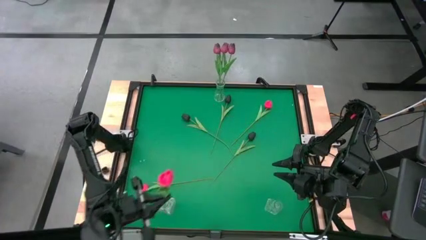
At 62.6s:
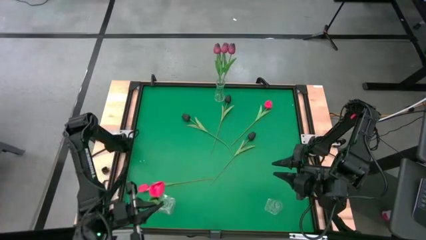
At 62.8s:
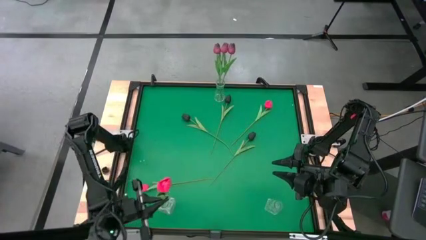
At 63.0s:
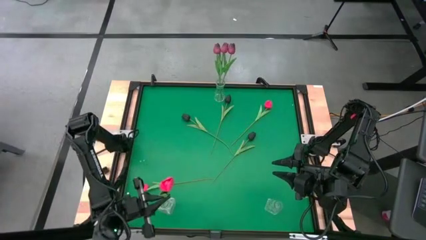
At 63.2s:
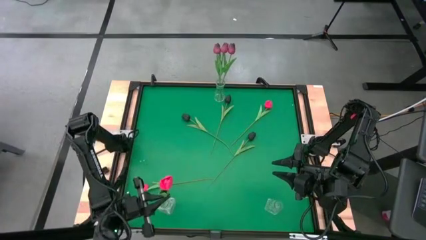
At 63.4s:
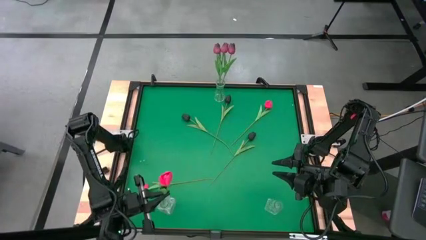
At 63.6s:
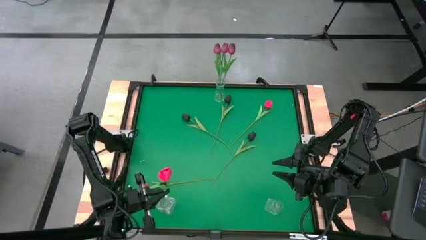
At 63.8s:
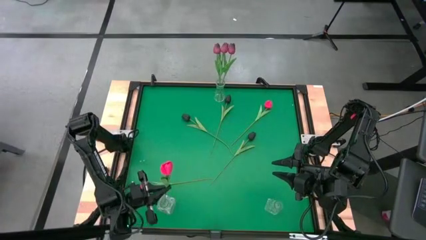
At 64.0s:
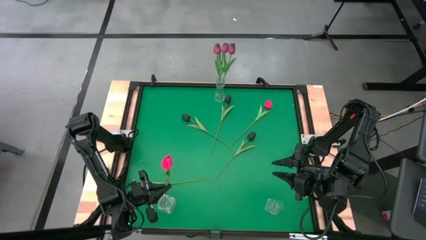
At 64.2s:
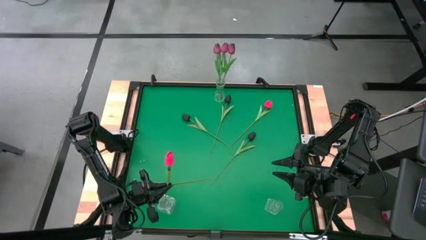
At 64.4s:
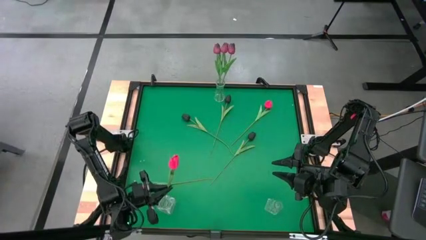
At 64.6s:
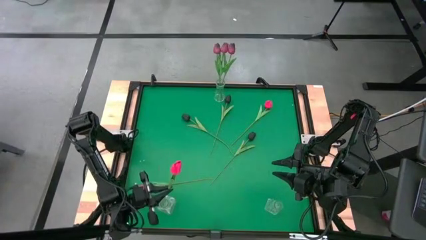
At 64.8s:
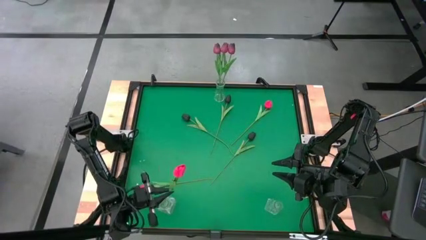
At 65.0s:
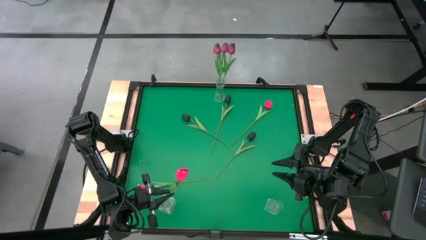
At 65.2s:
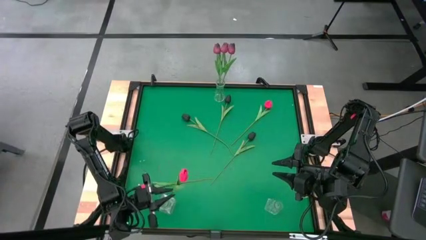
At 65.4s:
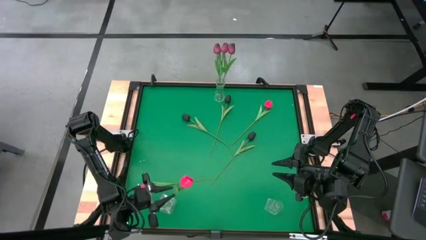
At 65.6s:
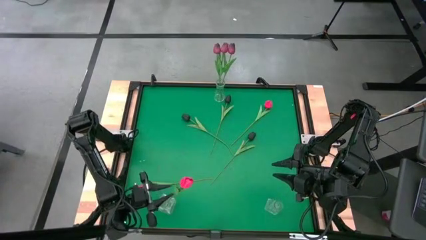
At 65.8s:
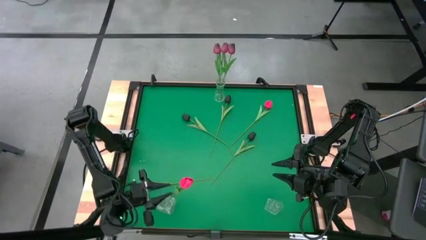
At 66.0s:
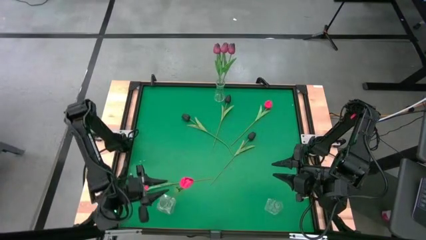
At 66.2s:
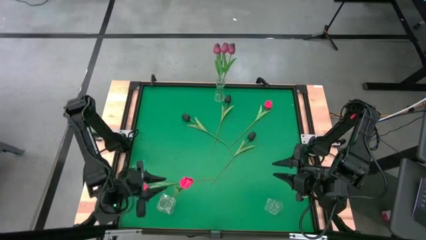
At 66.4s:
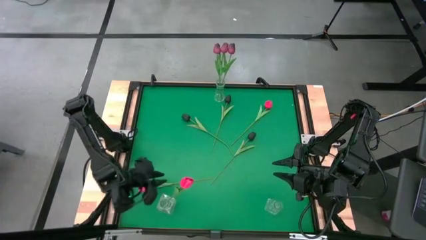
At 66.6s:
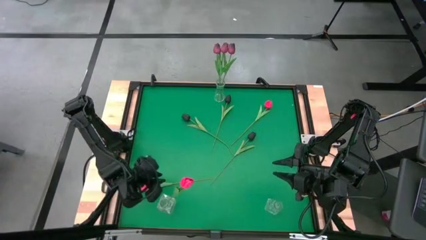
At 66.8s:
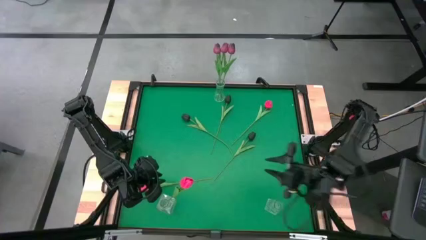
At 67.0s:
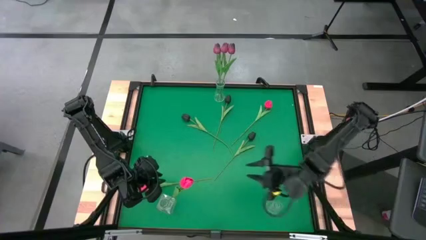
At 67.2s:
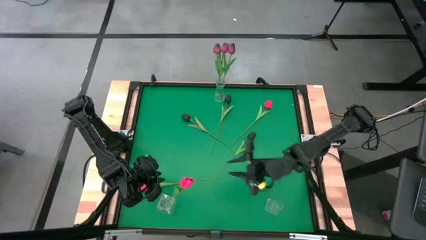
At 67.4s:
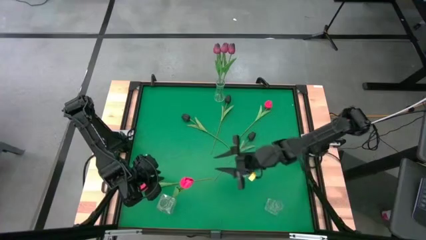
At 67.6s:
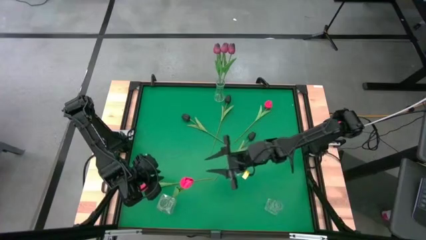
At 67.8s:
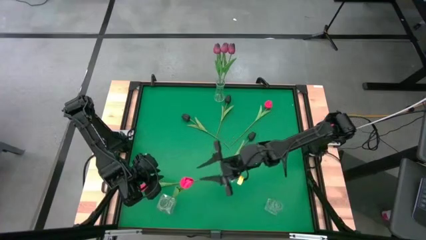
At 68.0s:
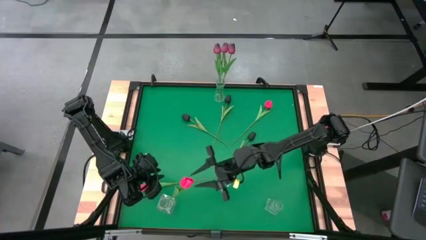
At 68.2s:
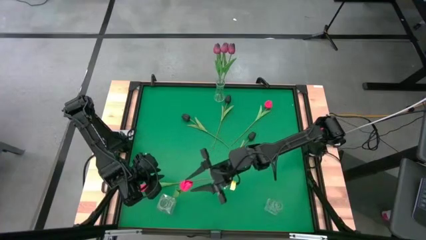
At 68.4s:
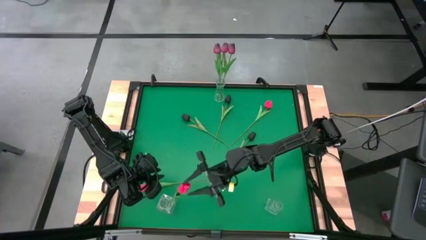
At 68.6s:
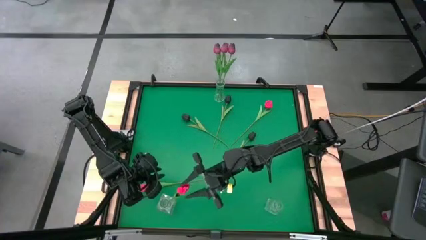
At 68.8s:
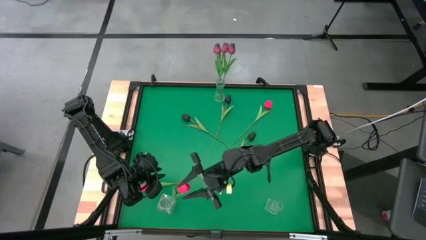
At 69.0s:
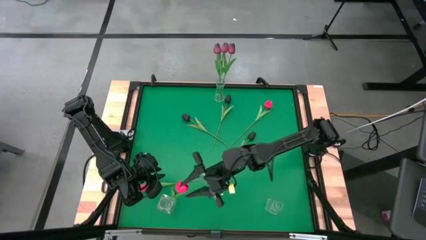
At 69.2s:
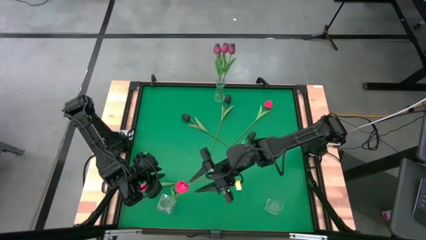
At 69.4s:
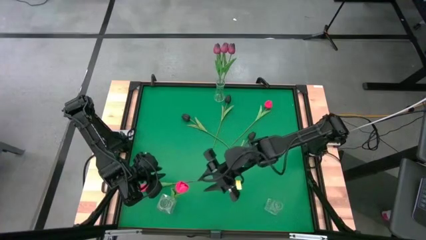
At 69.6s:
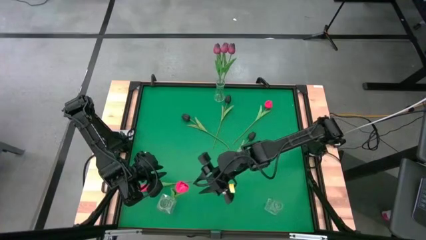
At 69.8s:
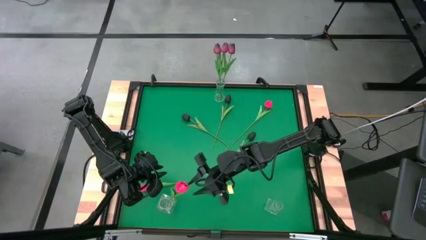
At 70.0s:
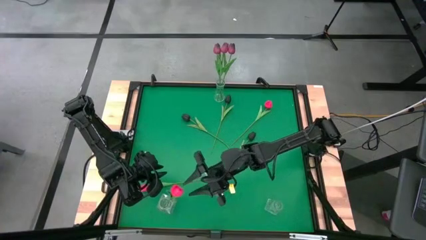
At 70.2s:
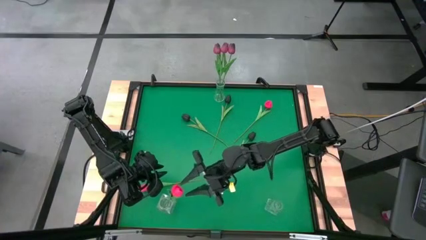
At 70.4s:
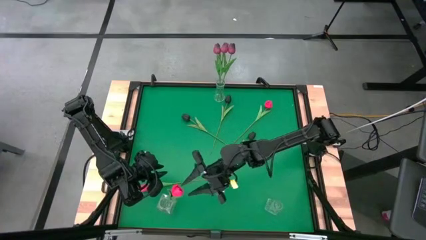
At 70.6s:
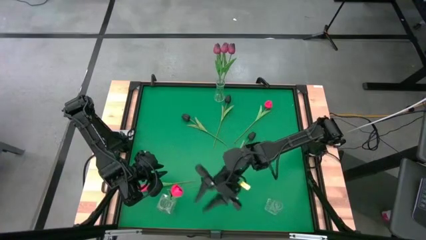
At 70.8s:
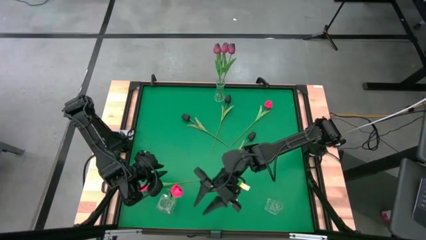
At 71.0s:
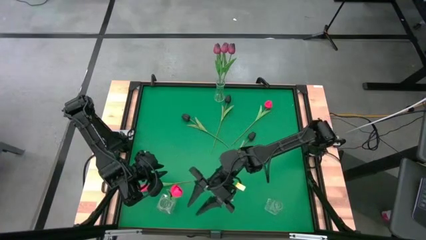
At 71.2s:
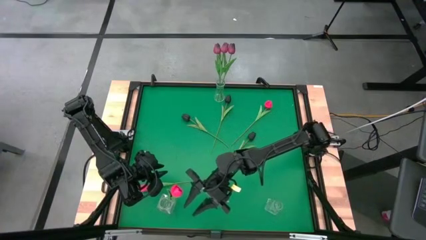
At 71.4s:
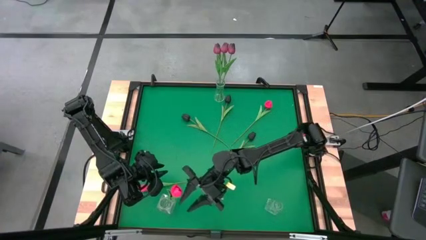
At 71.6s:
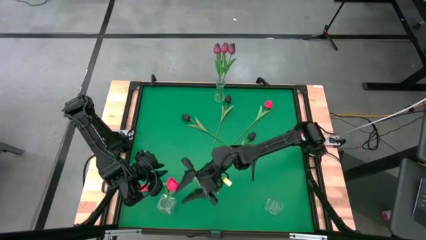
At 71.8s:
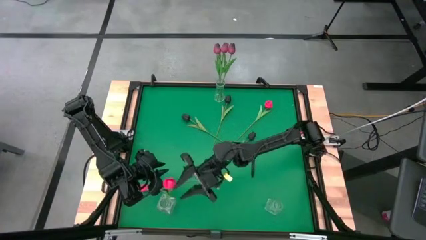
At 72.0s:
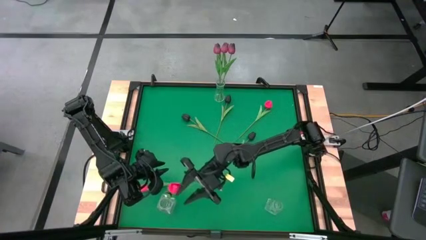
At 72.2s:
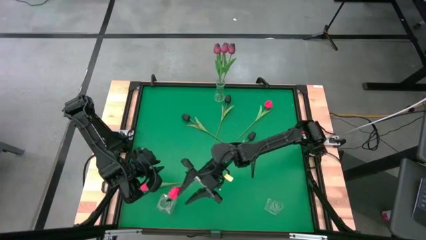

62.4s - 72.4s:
Task: Sort flowers into vase by color
Put the middle red tulip into the bottom left transparent vase

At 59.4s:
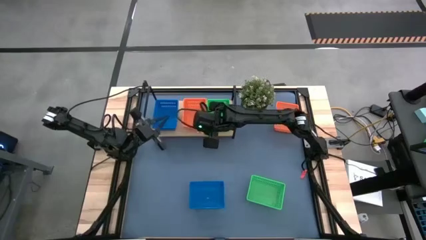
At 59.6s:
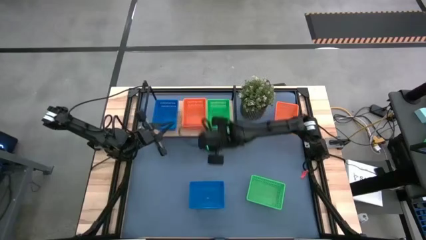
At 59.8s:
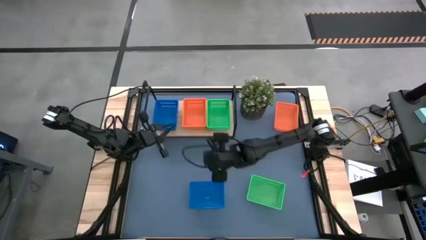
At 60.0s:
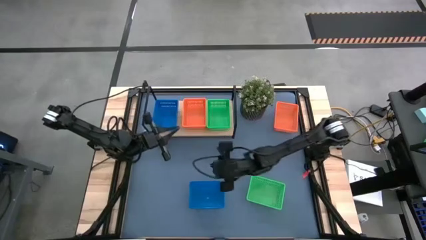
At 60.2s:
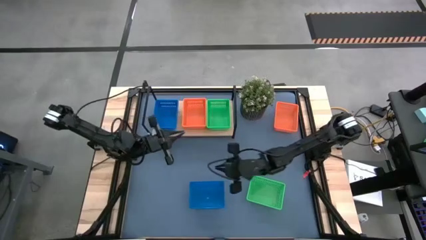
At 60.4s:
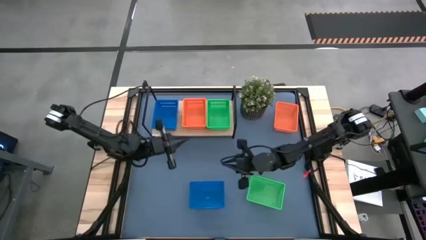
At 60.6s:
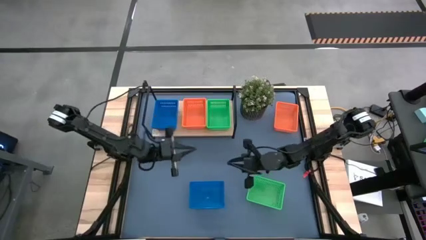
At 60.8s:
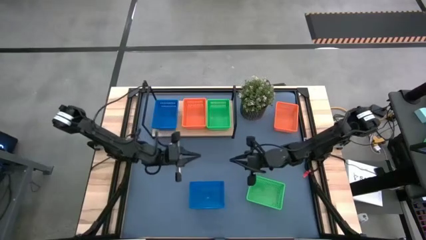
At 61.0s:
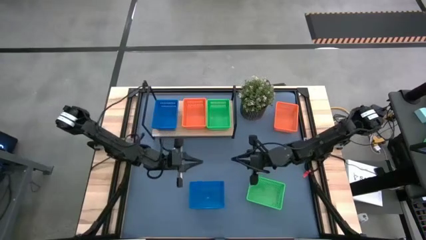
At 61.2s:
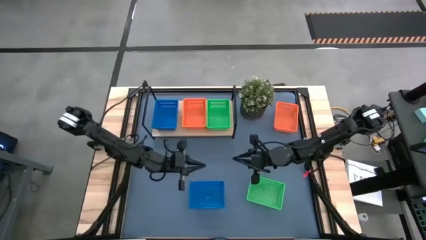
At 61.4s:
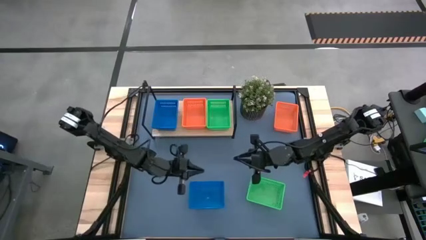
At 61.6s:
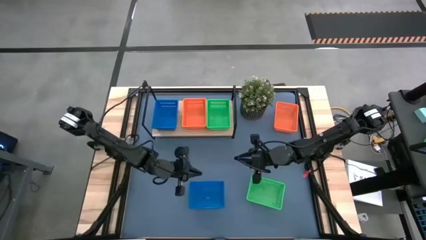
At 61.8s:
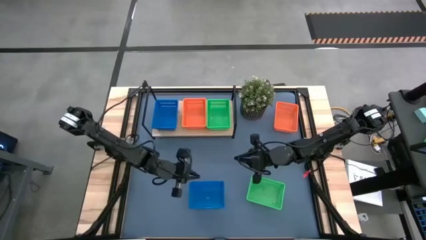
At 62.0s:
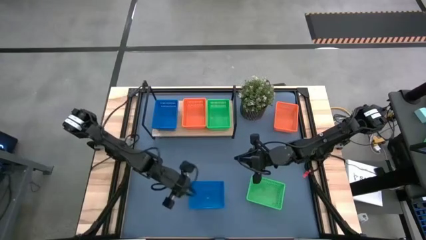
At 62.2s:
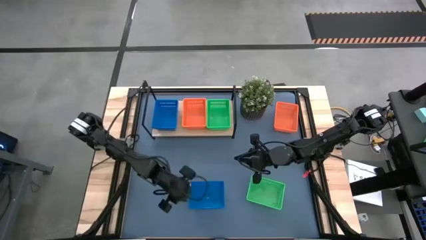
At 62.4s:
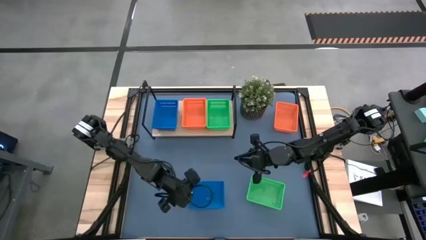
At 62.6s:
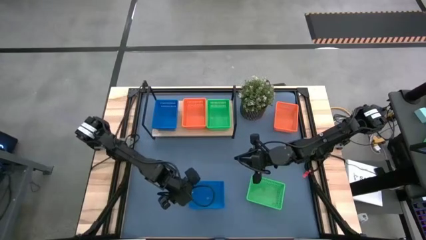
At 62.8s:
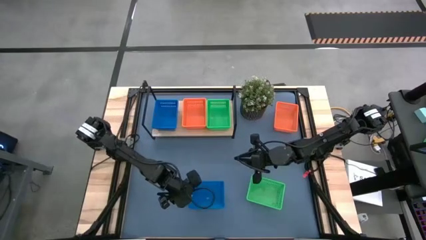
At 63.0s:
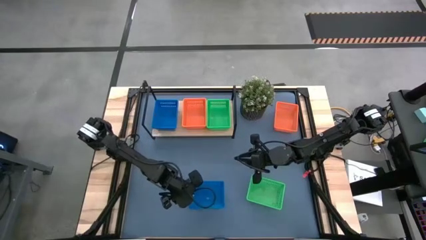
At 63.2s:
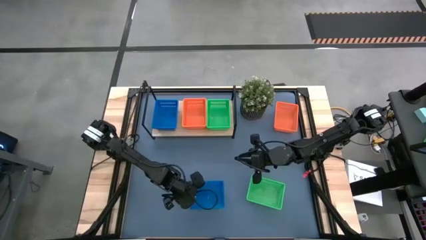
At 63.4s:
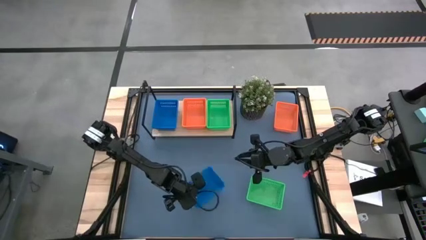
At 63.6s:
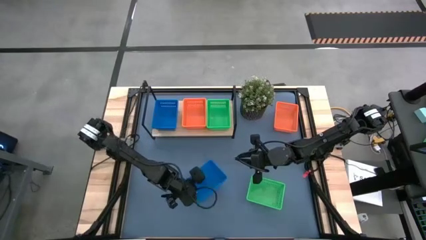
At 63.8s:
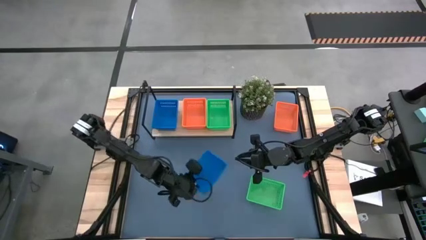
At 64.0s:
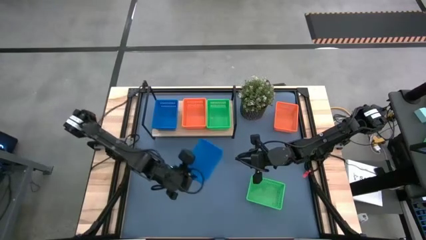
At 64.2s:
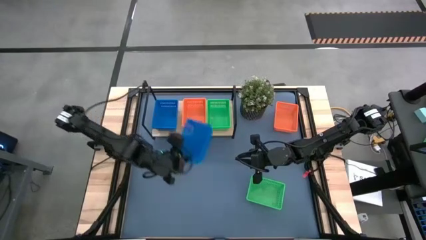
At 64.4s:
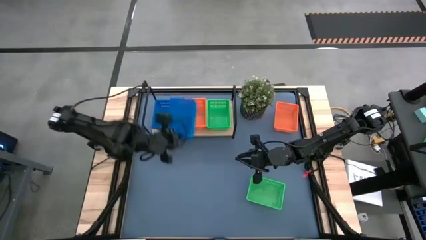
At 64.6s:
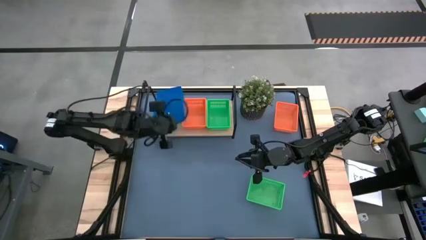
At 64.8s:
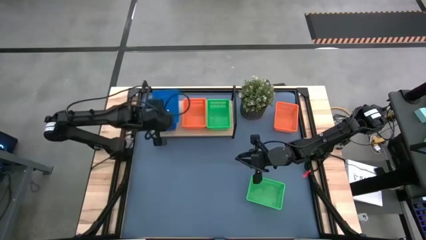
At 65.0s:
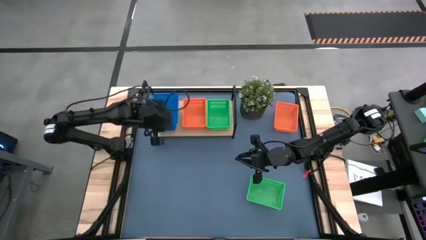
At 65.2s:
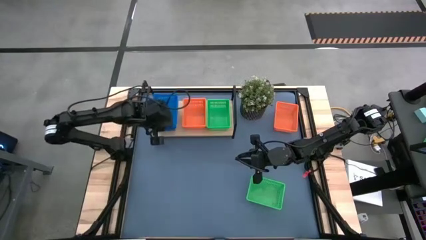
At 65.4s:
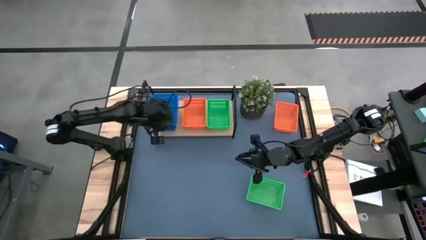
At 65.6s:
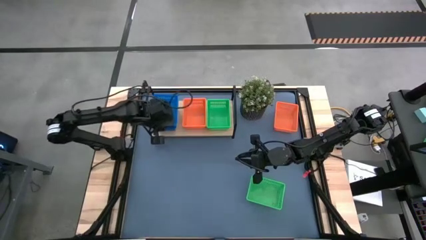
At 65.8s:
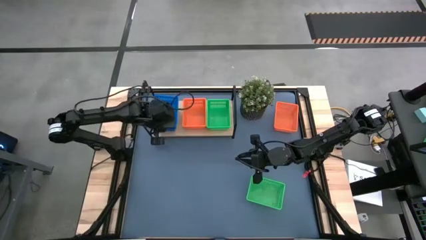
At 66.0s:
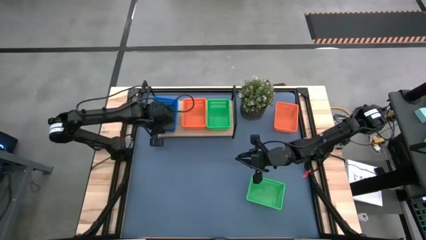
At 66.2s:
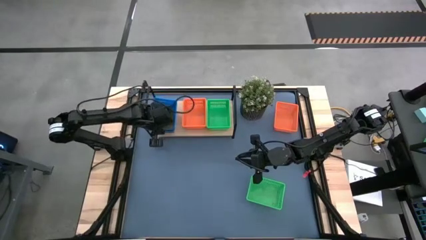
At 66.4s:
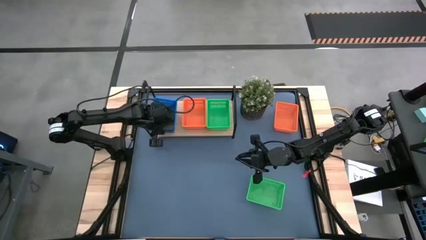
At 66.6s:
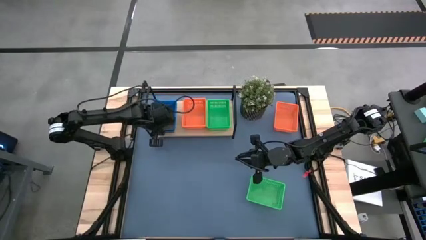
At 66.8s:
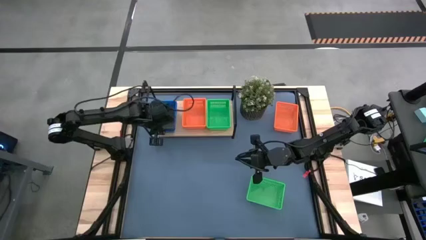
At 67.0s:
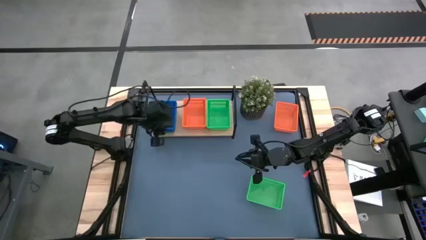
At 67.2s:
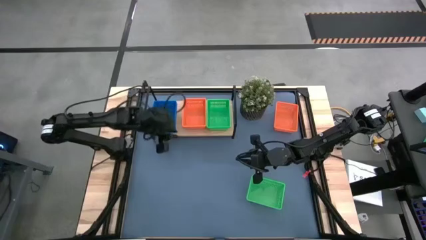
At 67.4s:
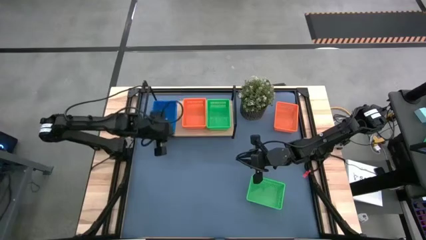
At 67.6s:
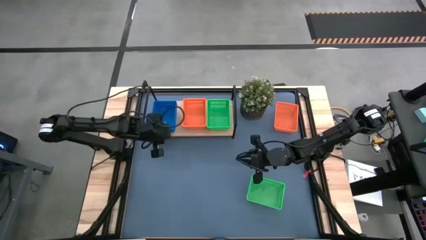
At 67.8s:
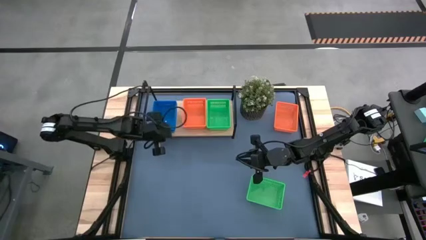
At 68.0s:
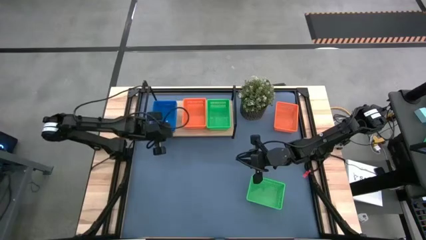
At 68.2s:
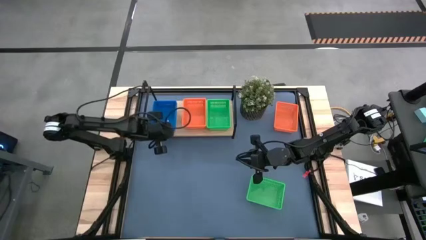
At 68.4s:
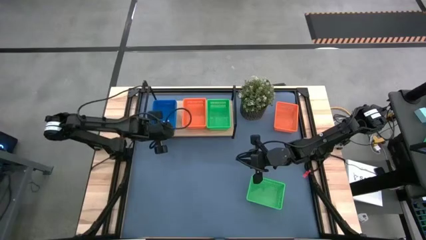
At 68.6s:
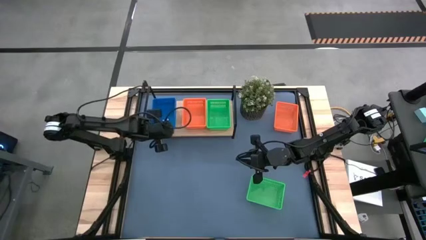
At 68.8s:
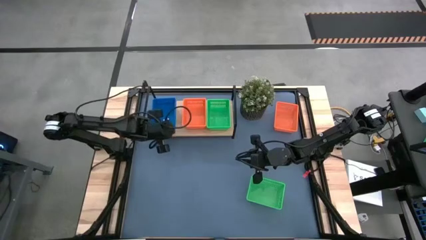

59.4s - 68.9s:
Task: Stack baskets on shelf by color
Stack the blue bin on top of the blue bin on the shelf
